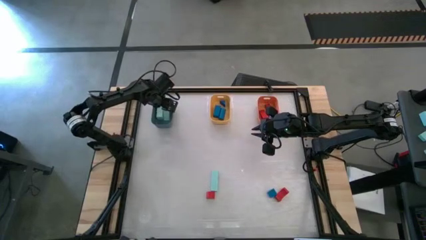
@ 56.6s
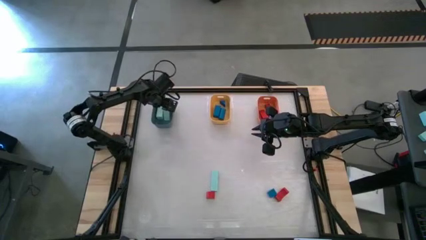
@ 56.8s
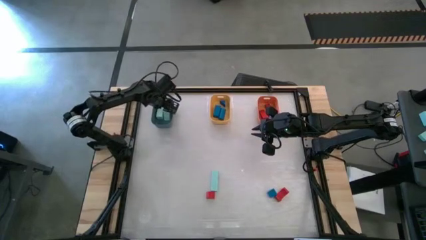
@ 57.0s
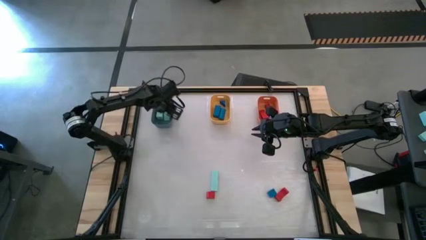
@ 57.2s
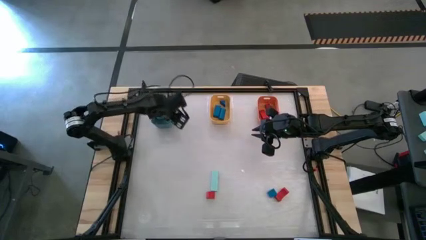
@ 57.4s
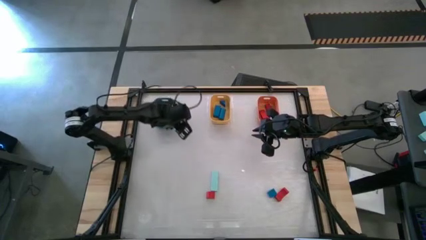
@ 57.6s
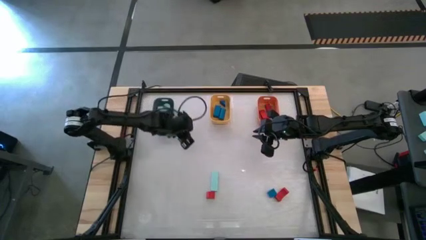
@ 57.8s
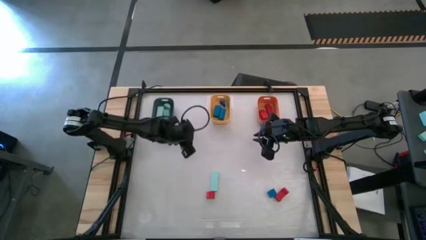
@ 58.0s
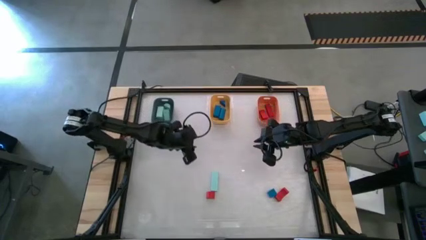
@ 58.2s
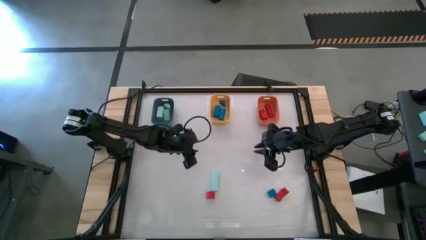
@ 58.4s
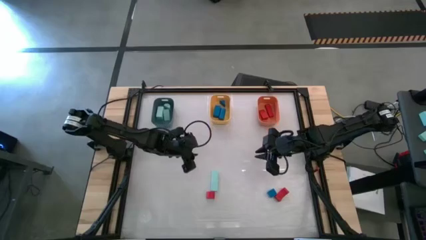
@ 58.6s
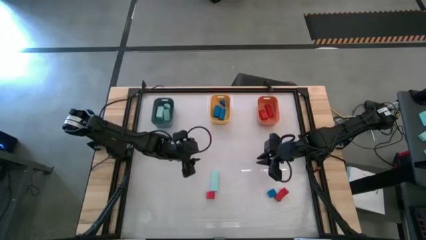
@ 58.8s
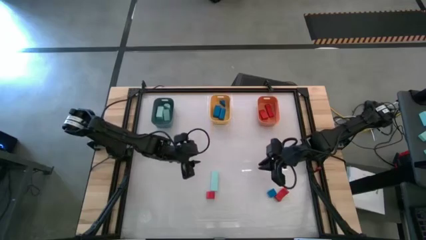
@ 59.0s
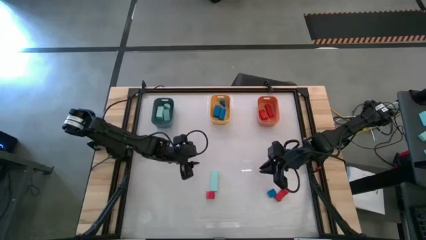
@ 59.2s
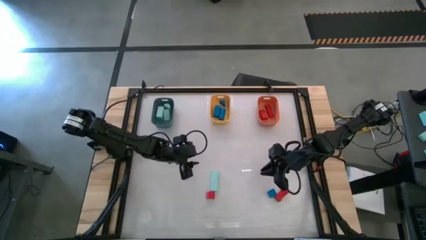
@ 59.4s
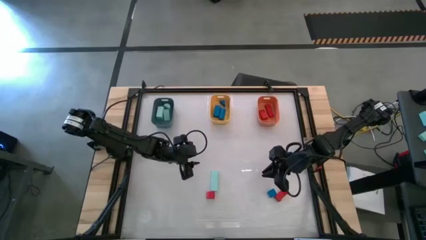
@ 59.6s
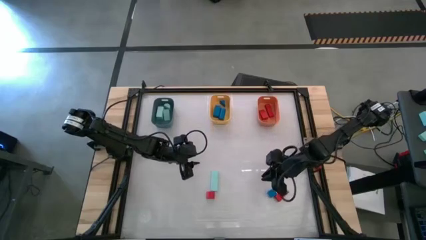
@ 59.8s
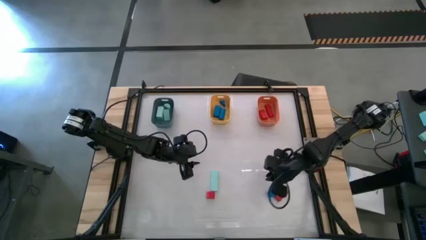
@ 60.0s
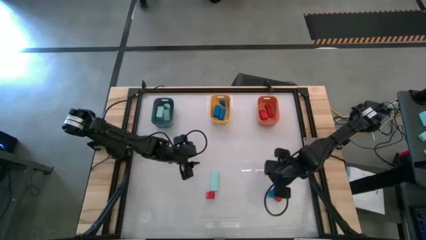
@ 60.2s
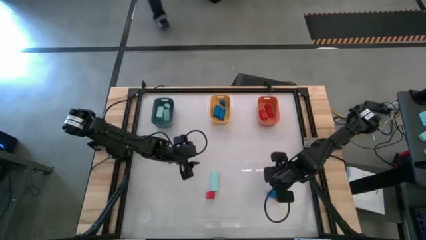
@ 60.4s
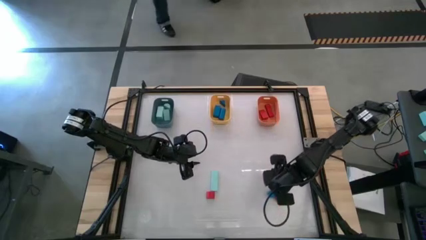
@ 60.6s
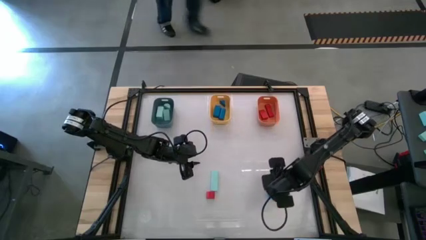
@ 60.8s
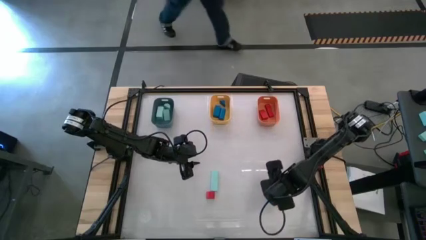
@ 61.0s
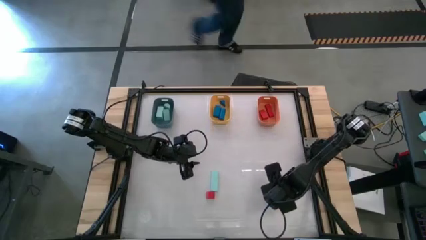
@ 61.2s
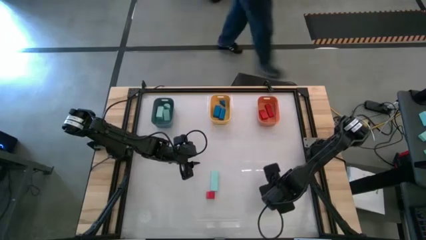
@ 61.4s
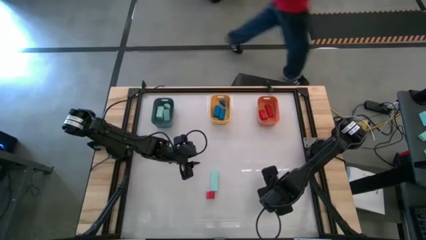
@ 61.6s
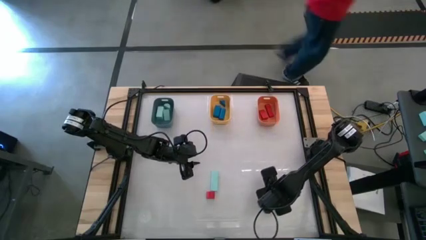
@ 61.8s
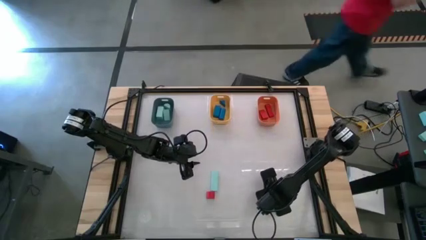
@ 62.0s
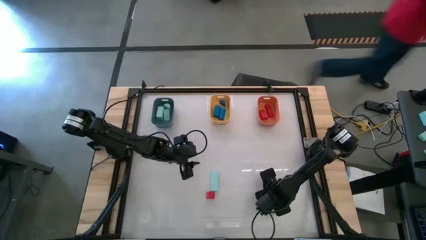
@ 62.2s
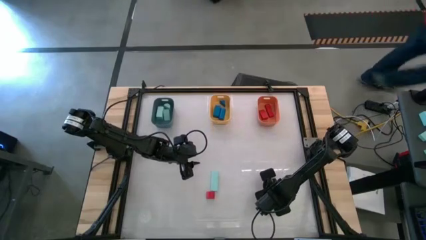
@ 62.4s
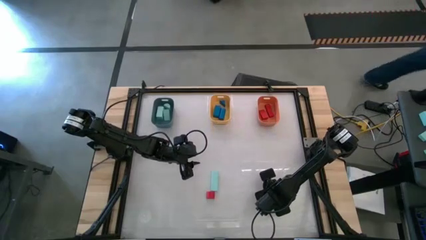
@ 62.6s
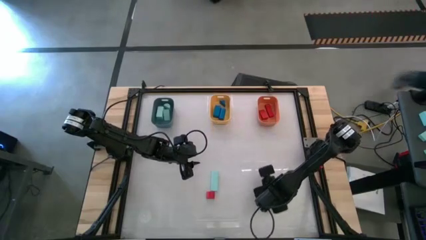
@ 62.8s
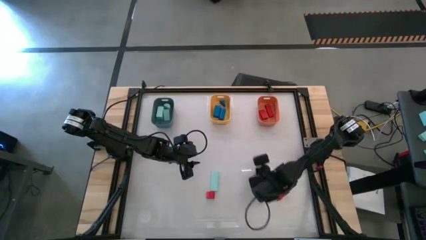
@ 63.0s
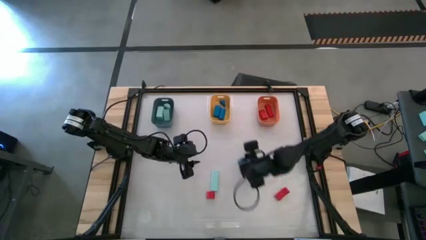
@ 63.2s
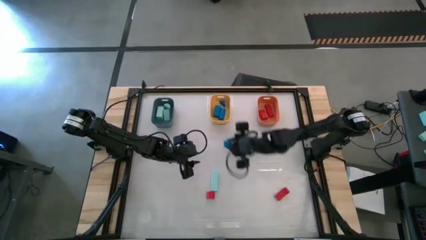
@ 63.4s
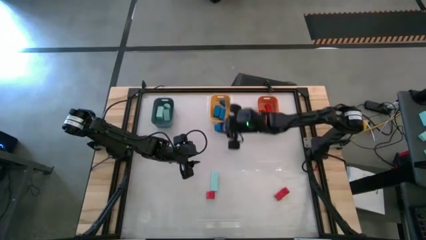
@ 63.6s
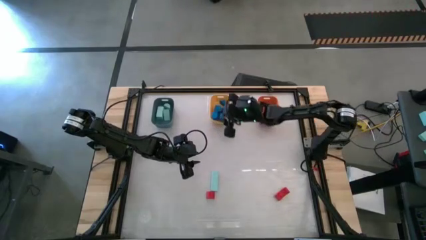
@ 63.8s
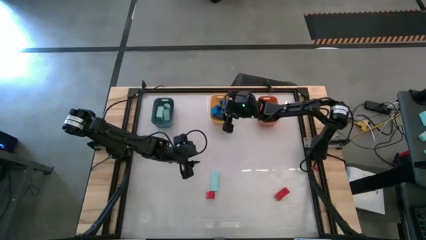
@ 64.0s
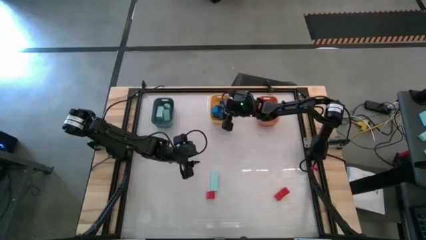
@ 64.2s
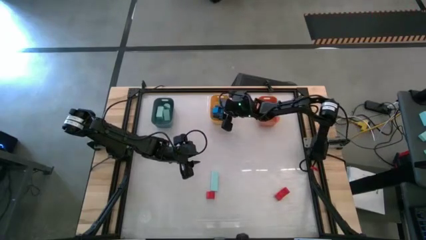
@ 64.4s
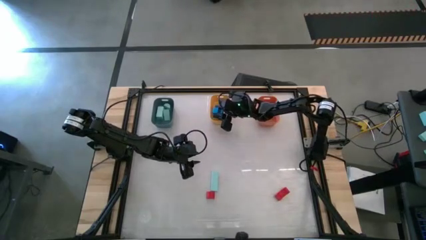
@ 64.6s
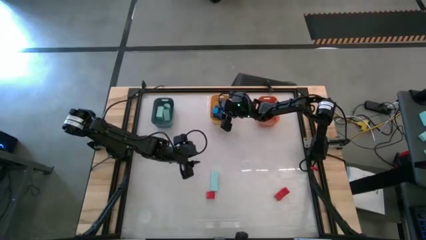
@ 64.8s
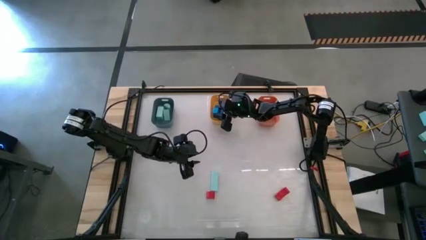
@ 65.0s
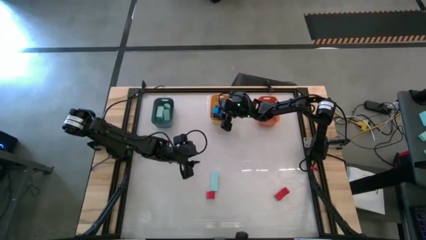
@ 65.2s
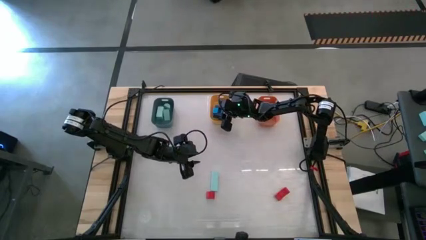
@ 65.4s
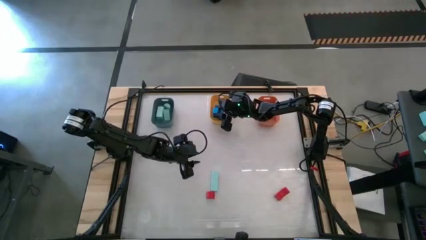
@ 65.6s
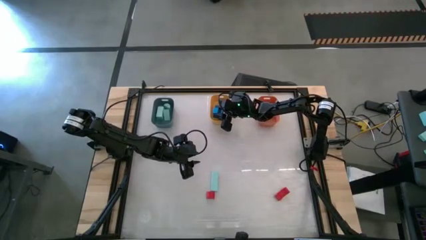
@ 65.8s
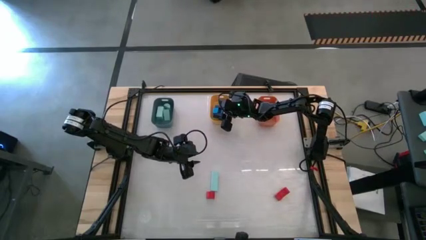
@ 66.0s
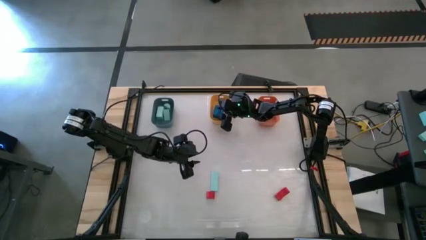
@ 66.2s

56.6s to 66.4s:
Task: Sort & place blocks by color
Put the blue block into the yellow bin

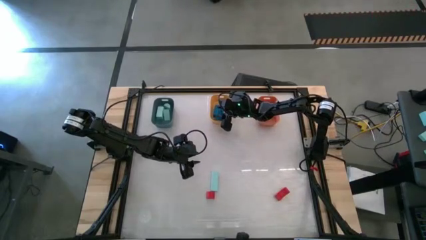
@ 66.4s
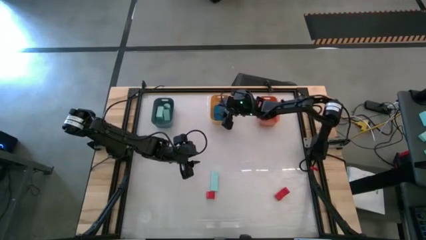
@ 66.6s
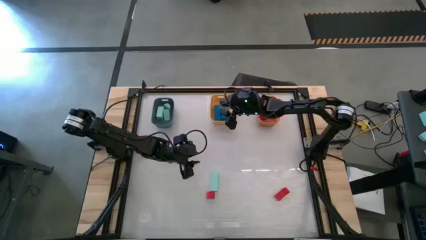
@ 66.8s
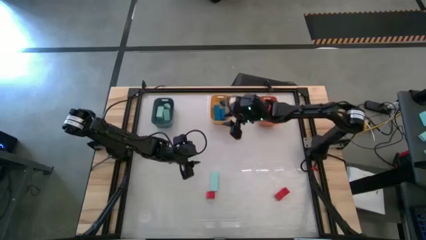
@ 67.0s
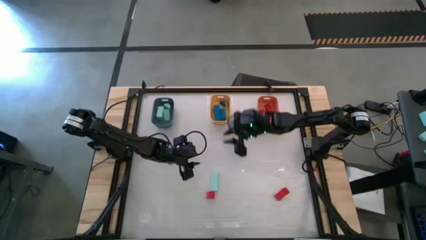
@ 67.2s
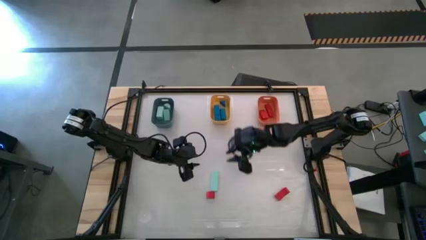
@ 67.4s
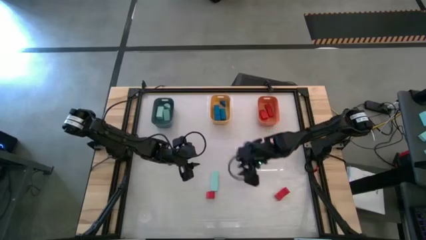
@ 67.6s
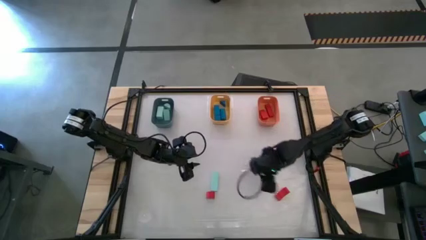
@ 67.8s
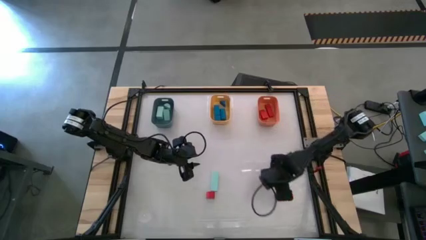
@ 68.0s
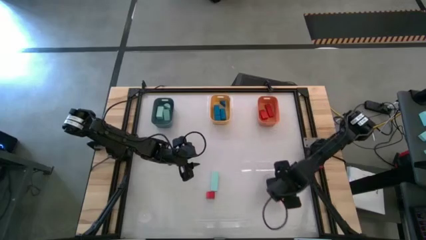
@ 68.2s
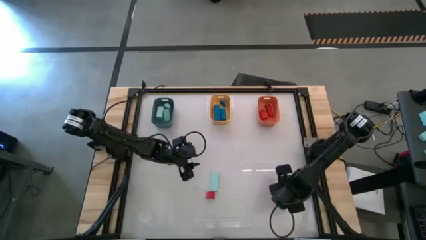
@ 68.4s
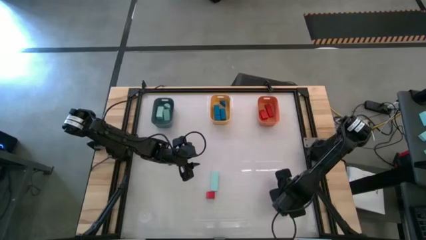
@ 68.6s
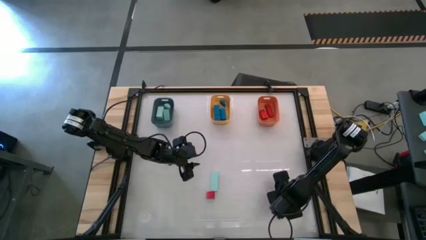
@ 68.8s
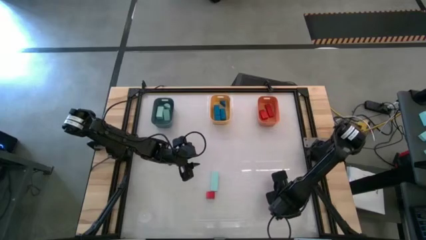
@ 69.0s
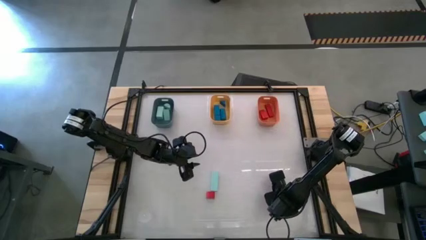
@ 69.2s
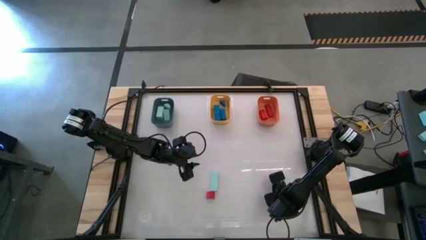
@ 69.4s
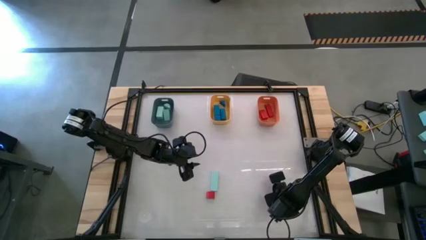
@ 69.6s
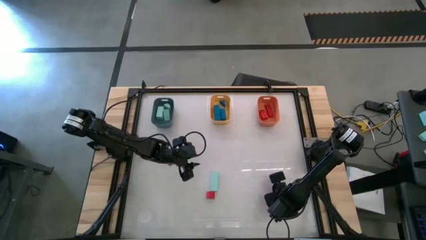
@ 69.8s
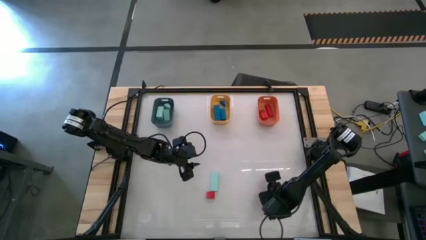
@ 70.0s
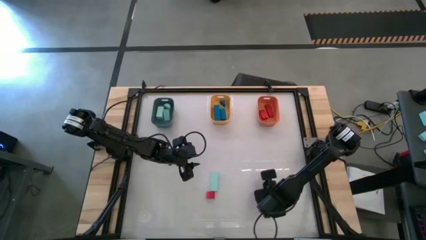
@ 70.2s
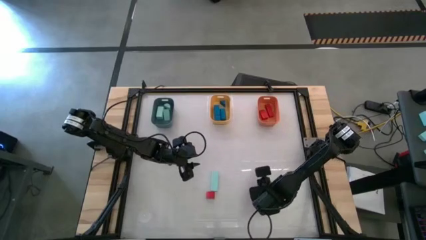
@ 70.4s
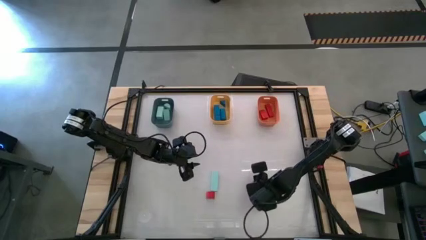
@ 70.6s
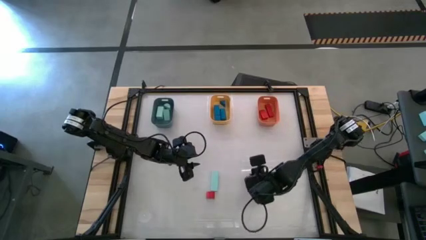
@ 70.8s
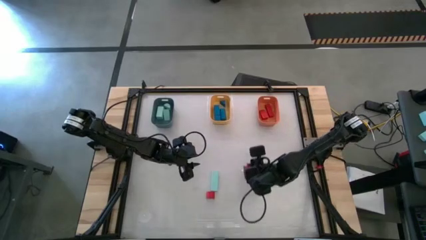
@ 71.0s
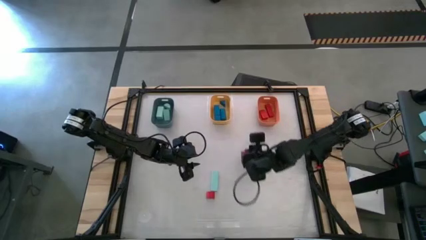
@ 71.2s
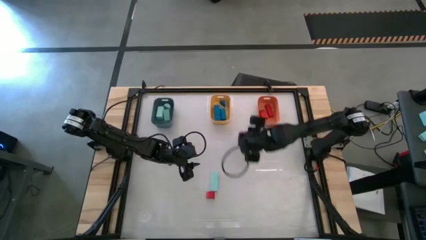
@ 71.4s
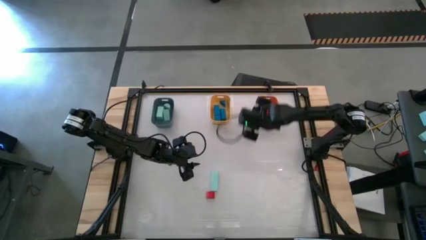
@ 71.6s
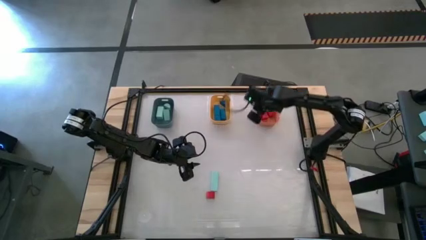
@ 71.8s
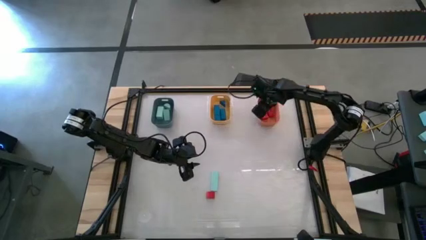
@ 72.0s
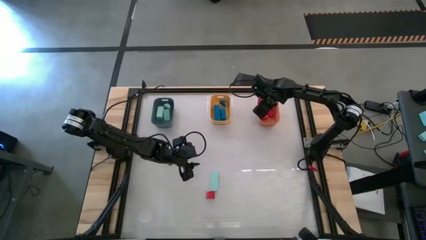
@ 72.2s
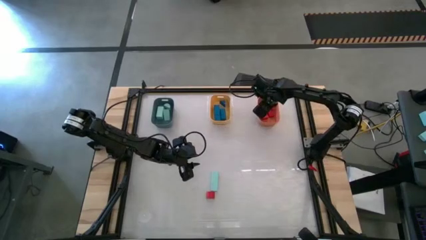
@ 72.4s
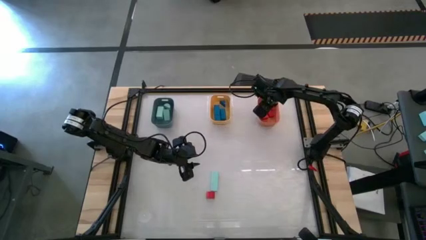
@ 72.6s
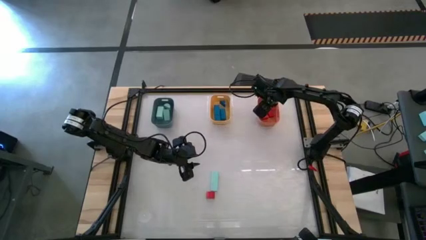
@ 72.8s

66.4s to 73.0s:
Put the red block into the orange bin

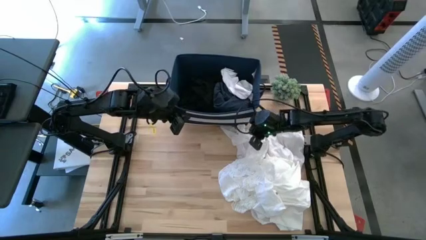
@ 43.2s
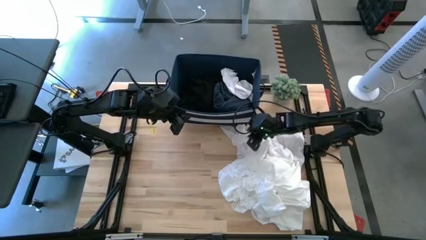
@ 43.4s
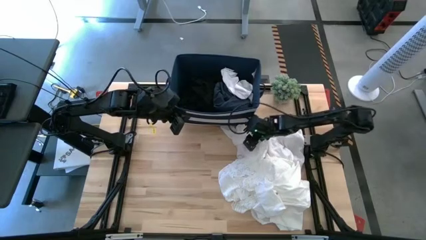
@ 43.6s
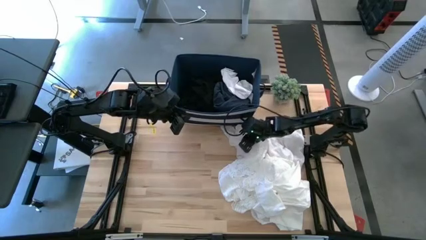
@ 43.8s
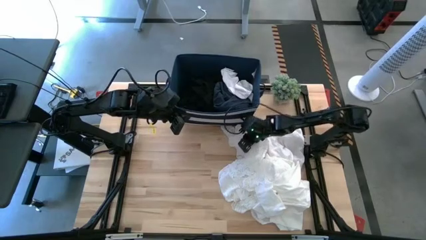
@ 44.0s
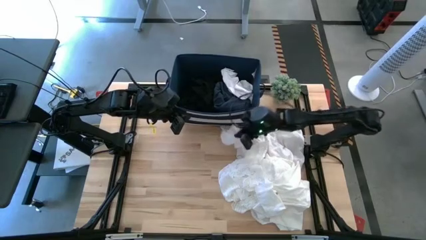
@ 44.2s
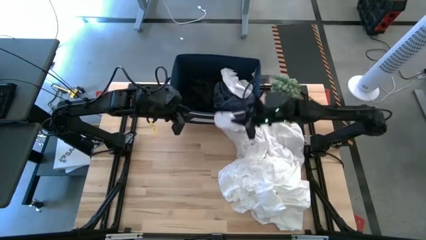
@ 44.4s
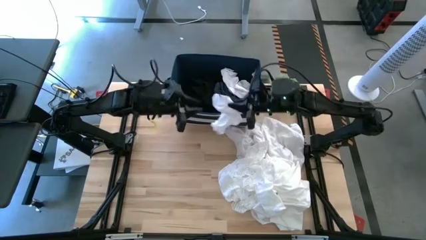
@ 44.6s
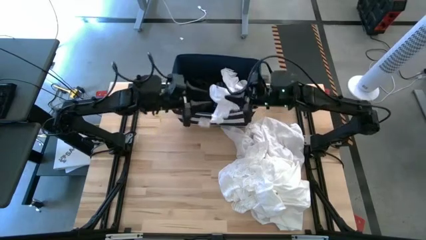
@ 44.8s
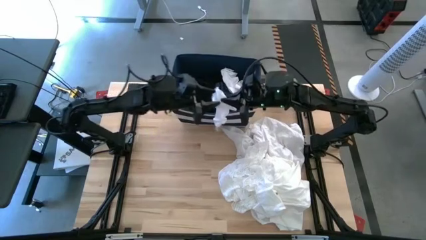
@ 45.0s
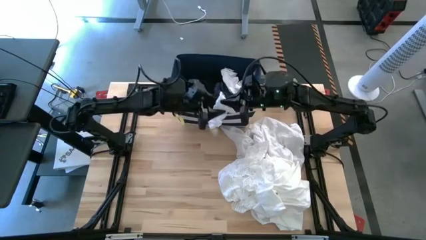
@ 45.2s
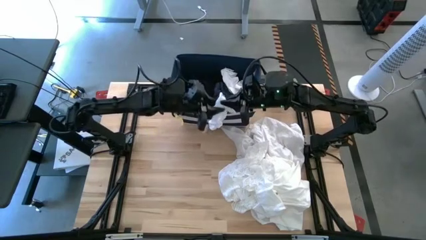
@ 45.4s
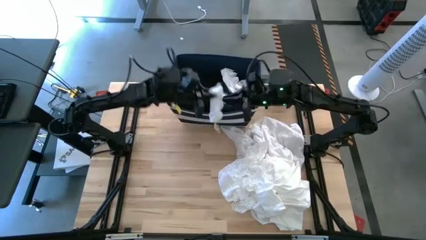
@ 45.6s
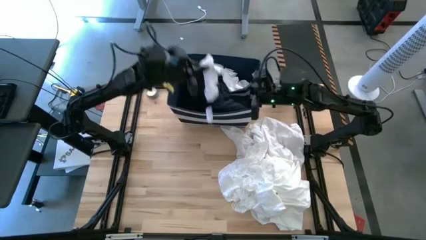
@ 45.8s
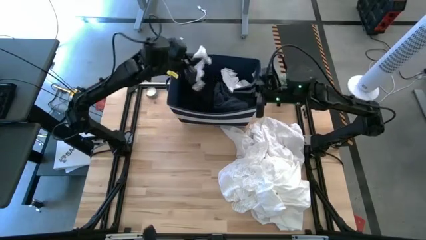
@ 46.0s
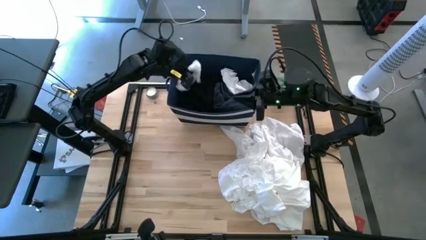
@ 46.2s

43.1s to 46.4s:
Task: Sort clothes
Put the white sock into the blue bin
